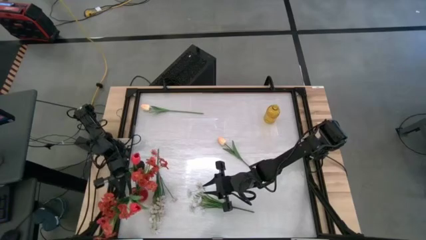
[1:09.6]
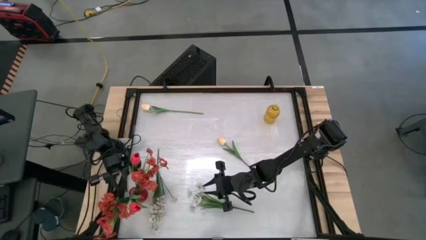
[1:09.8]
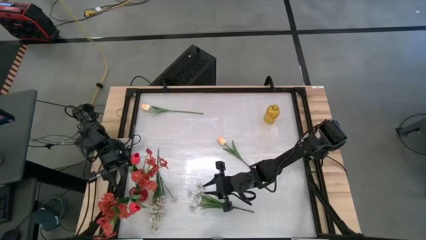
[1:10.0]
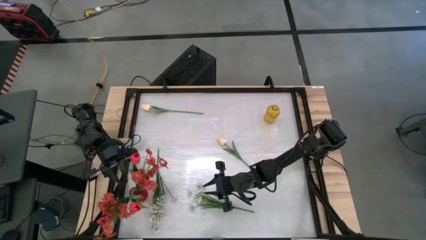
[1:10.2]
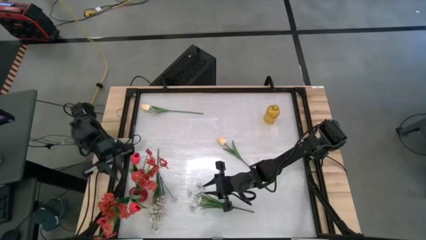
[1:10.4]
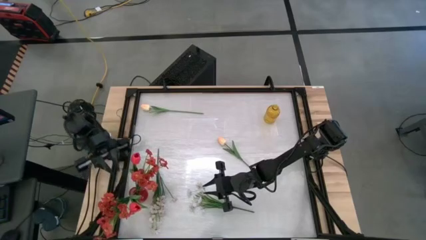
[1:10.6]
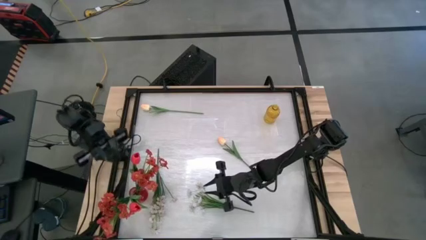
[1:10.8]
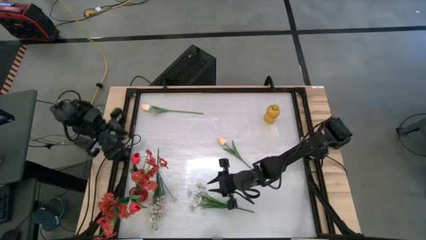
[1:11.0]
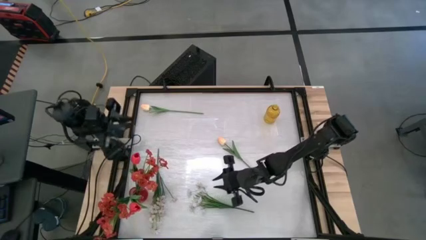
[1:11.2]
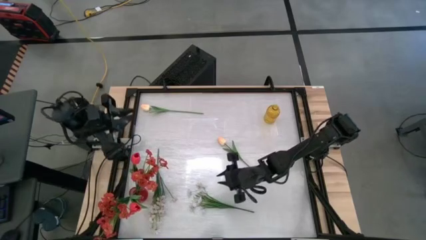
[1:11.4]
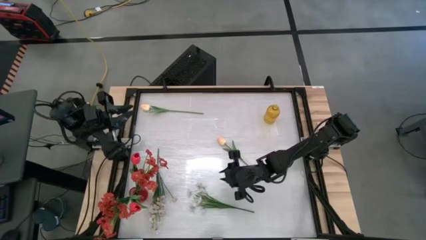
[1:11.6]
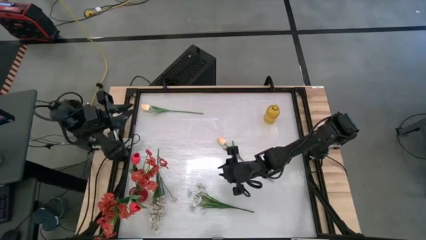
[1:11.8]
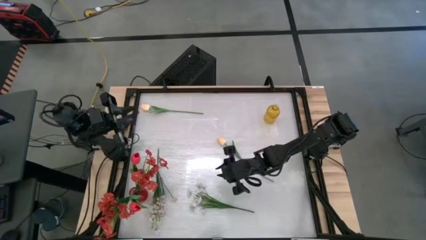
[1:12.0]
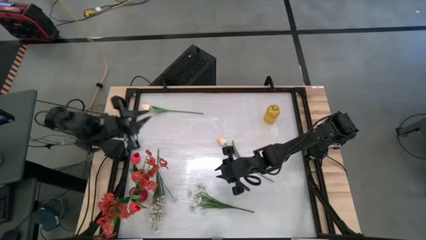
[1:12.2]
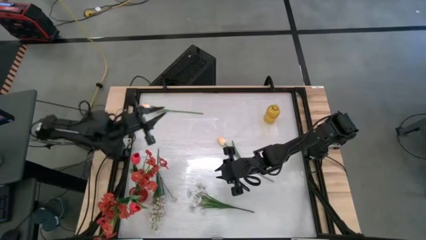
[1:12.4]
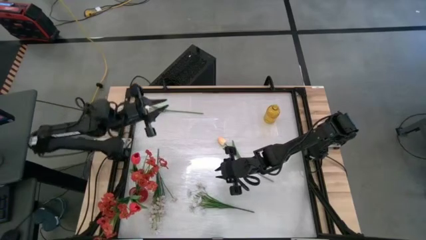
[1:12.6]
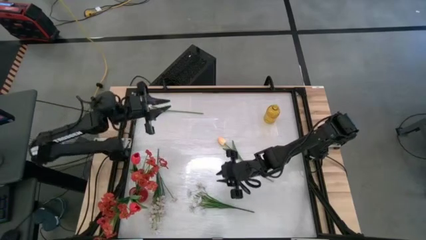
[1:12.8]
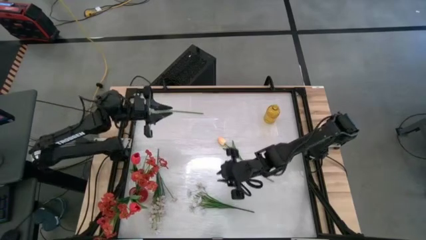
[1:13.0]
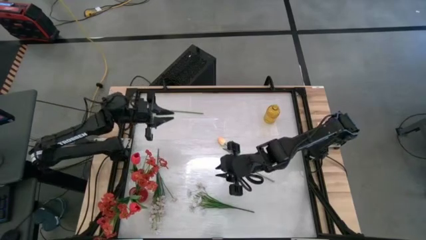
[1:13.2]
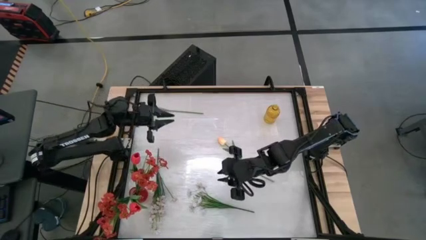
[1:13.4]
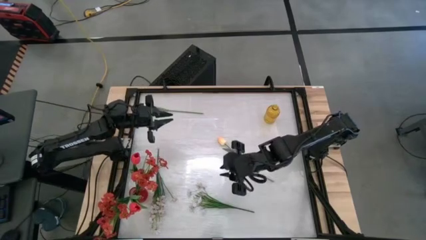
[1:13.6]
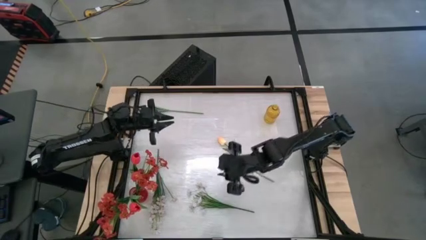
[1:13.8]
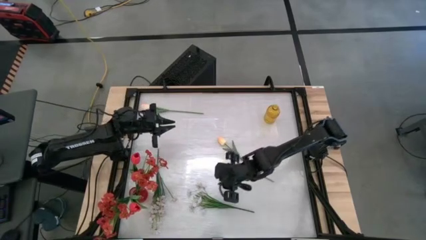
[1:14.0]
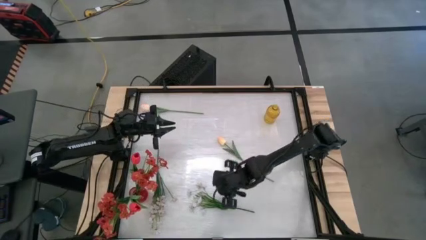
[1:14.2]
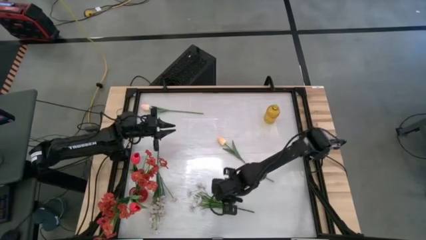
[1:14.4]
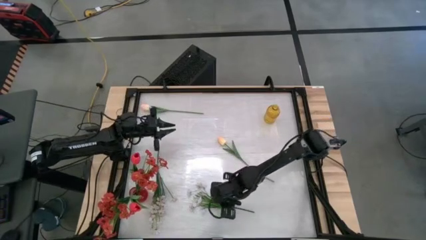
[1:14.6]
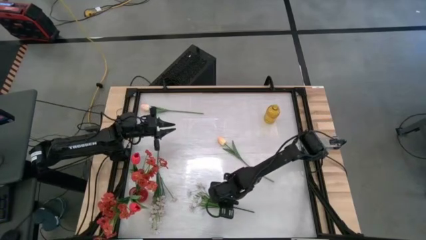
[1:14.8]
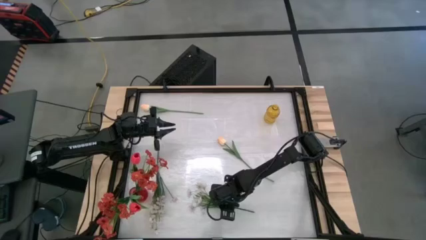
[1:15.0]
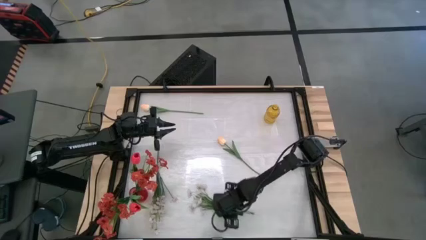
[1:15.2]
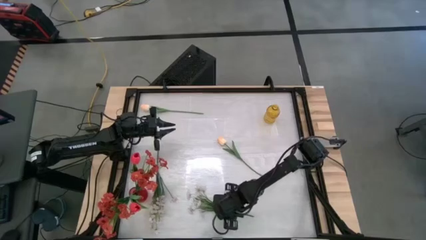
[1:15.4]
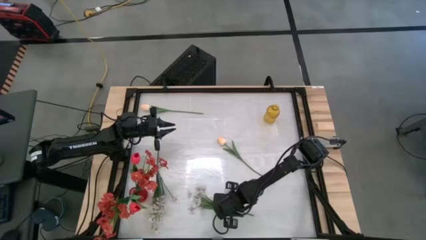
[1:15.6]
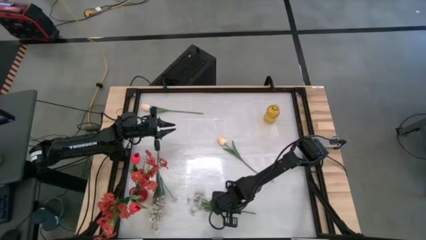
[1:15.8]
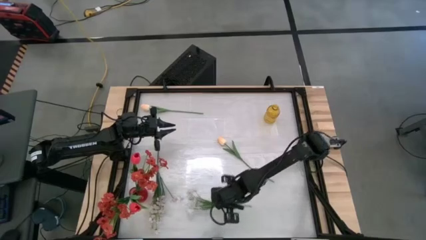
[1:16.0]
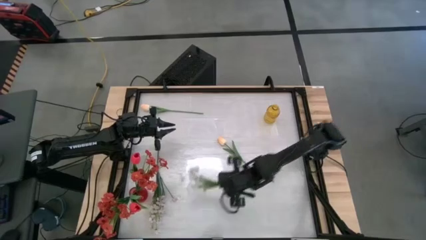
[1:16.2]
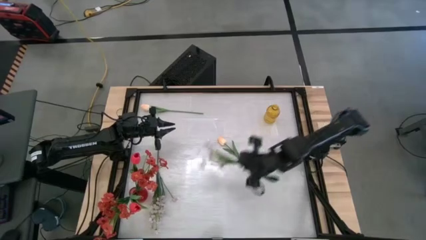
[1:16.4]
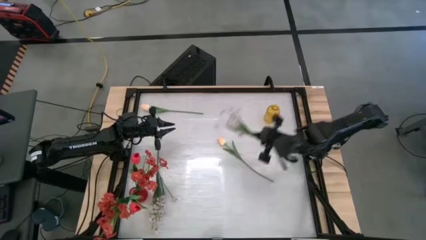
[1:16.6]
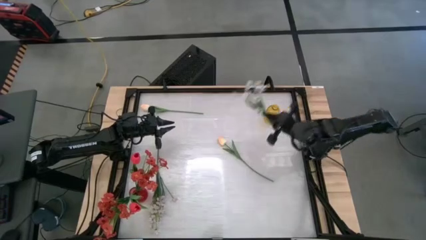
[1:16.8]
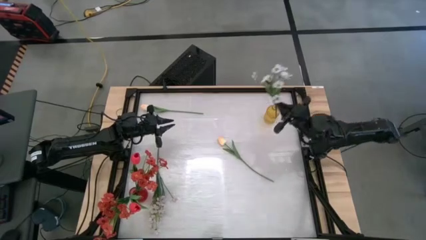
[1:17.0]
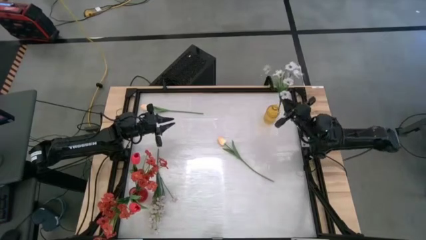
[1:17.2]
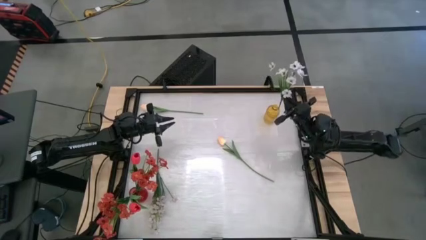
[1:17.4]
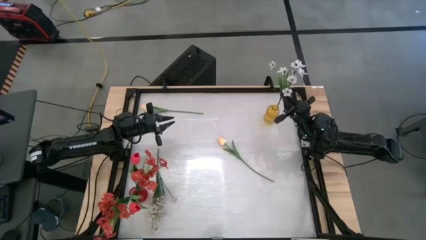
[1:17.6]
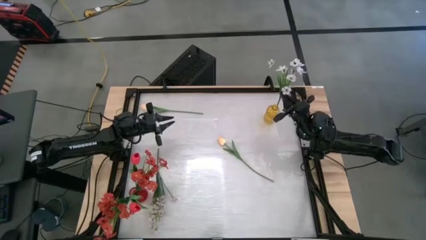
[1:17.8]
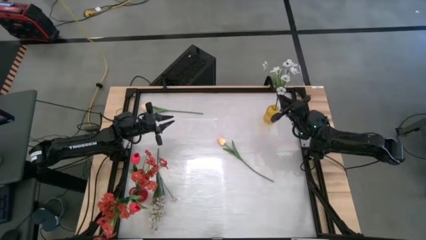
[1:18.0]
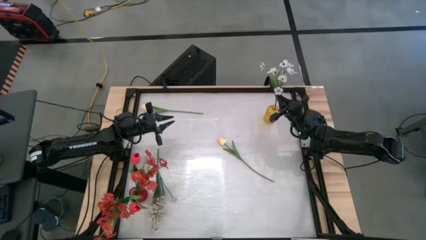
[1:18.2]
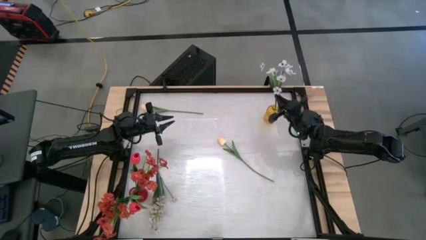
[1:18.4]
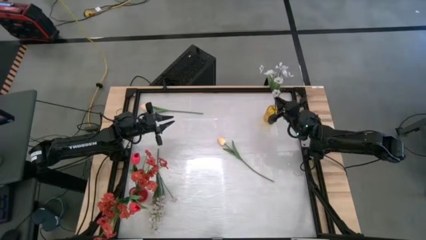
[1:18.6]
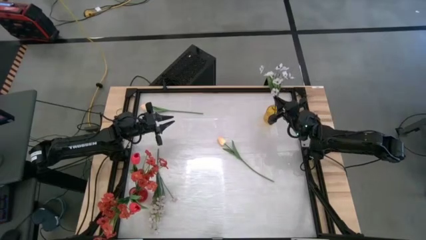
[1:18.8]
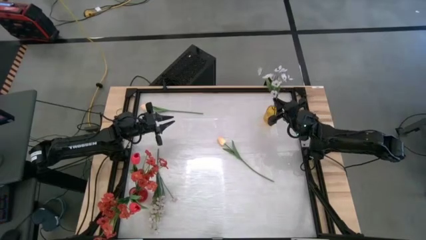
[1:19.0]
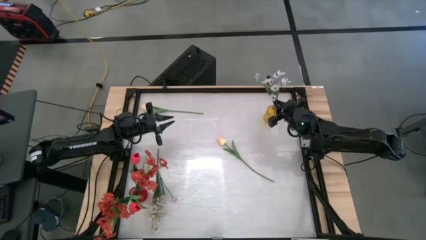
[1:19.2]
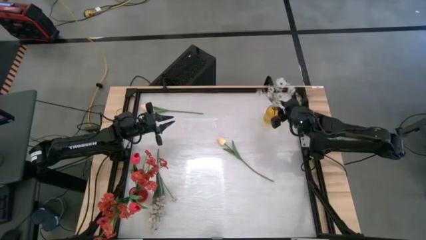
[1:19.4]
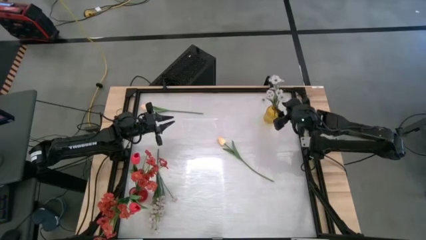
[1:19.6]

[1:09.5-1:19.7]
Task: Sort flowers into vase by color
Put the right white flowers into the yellow vase
